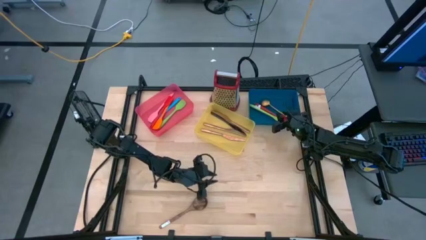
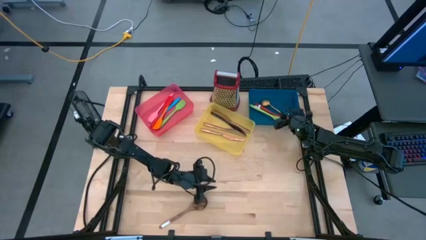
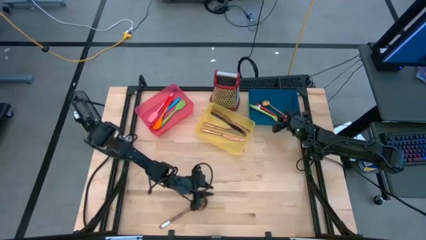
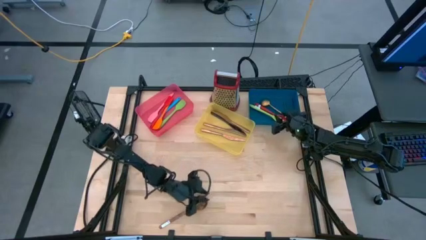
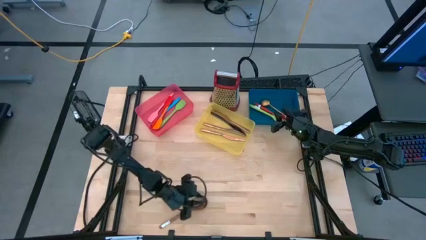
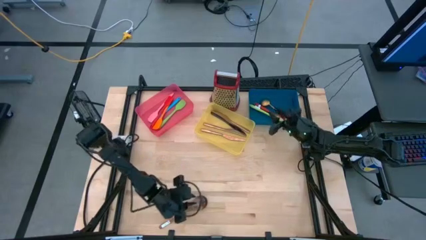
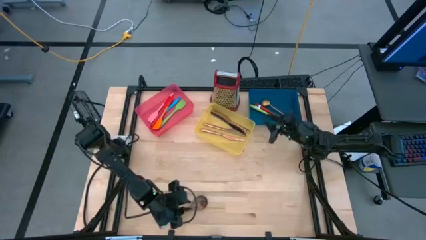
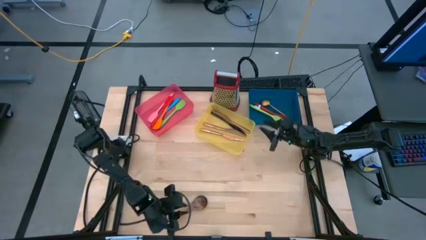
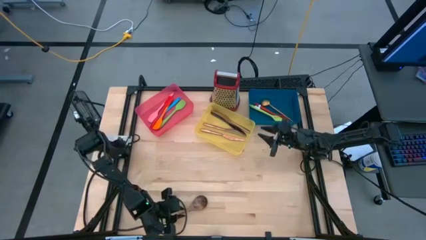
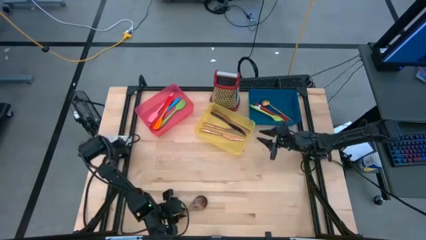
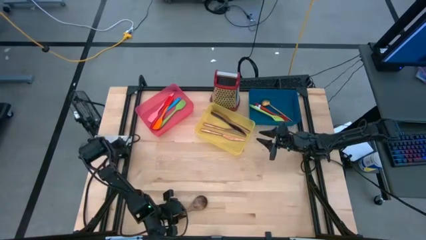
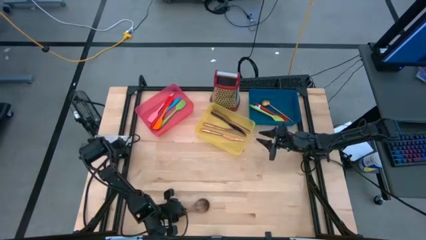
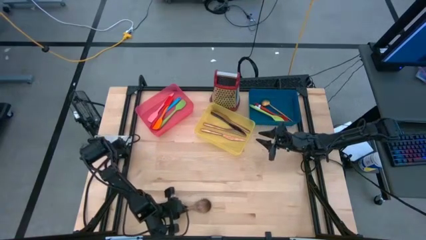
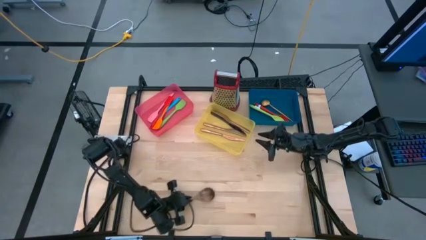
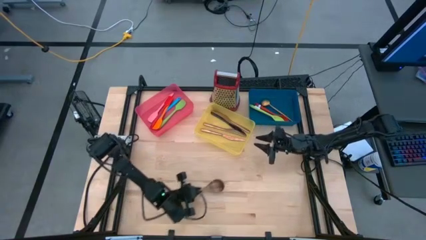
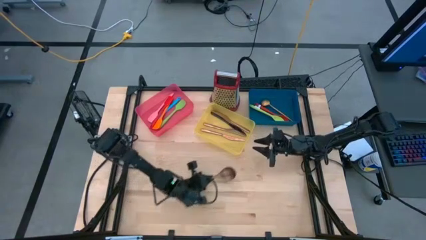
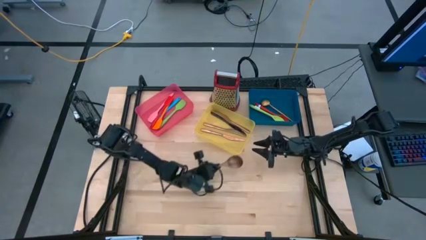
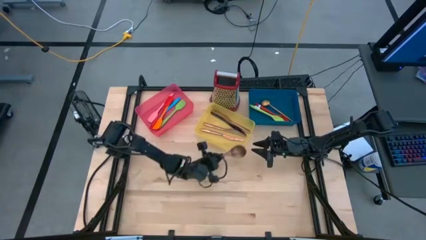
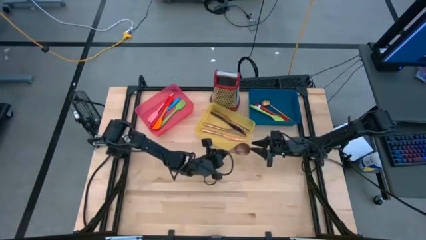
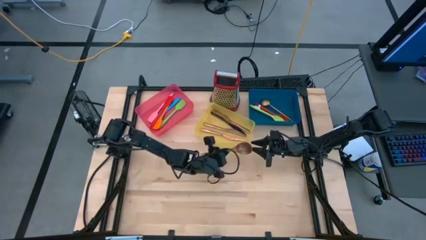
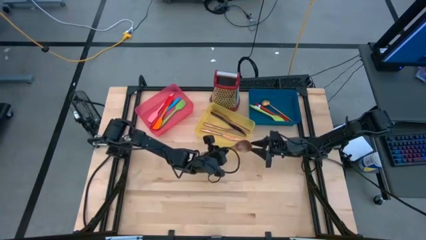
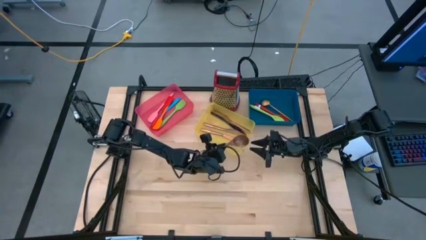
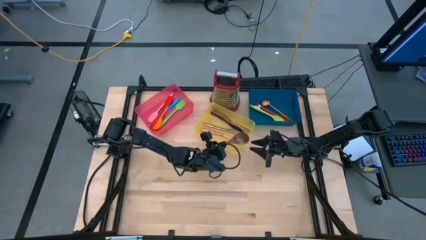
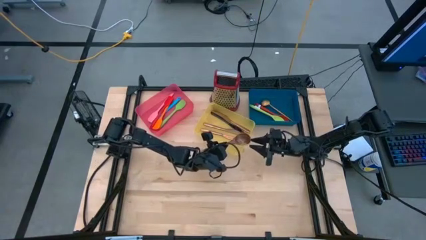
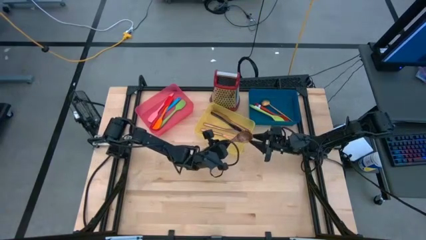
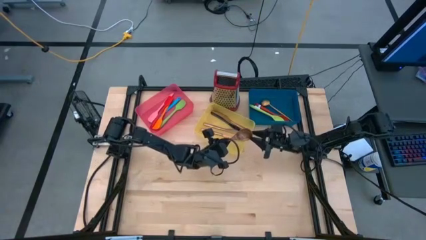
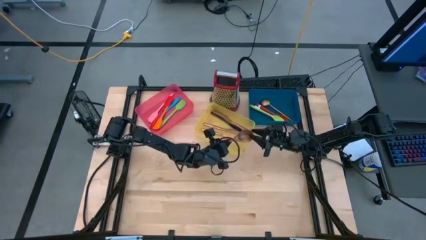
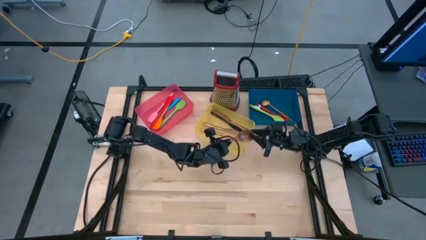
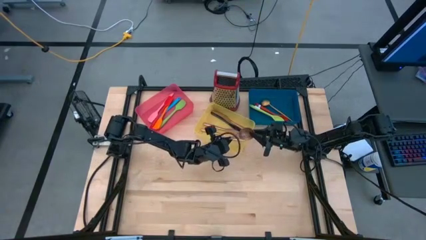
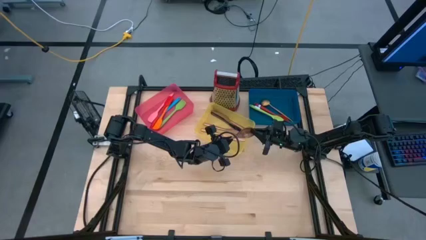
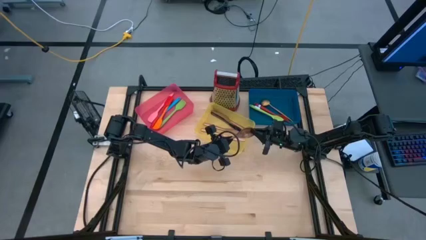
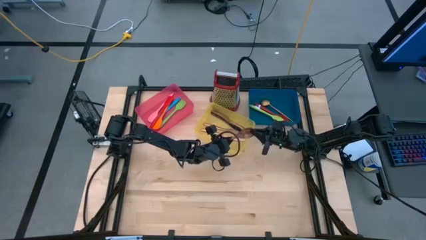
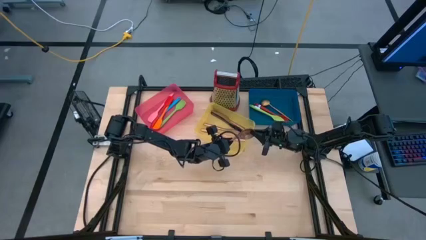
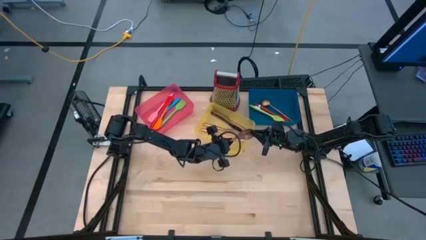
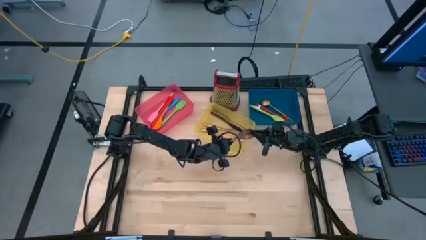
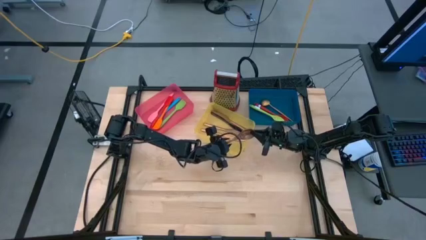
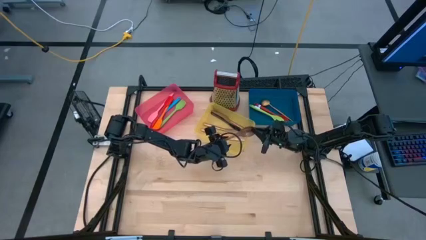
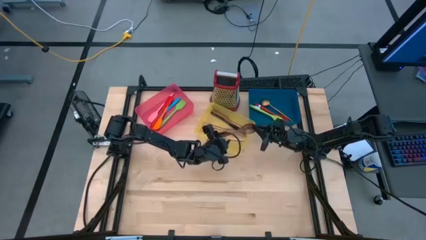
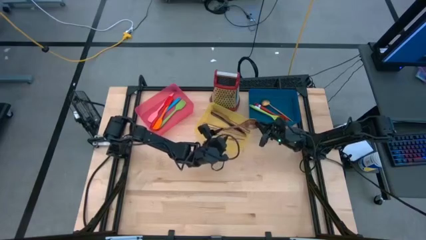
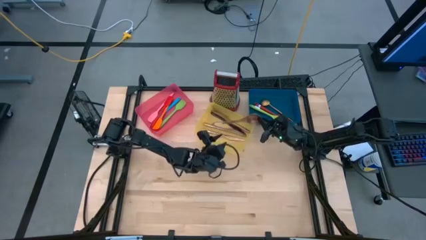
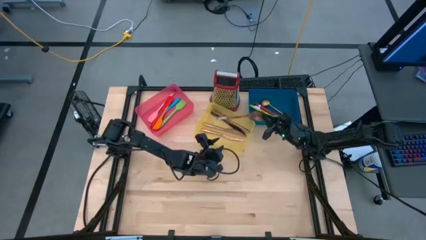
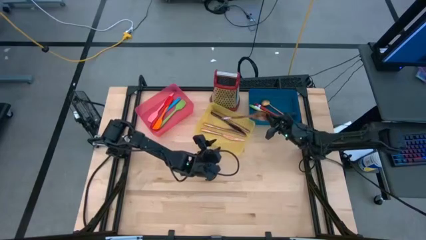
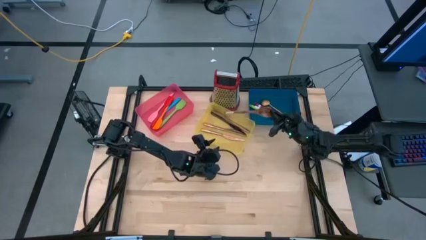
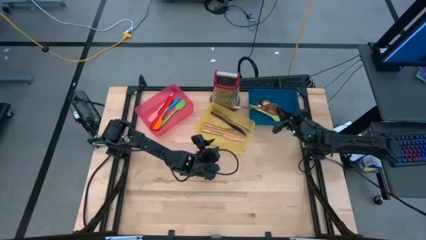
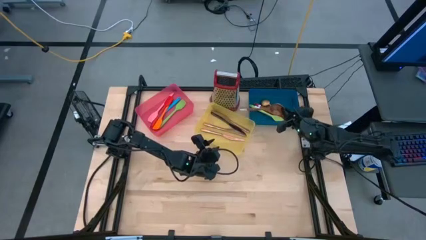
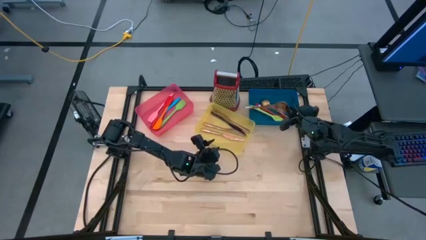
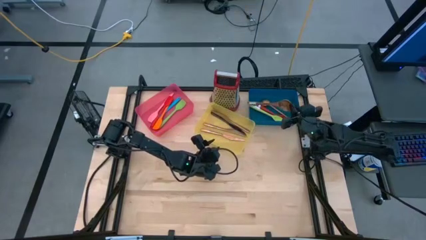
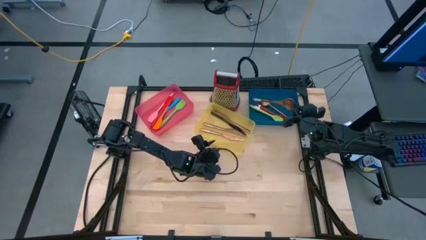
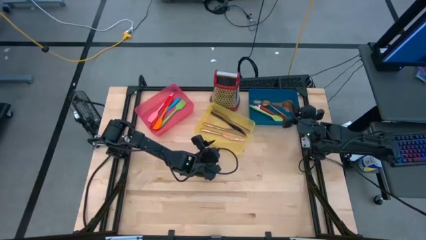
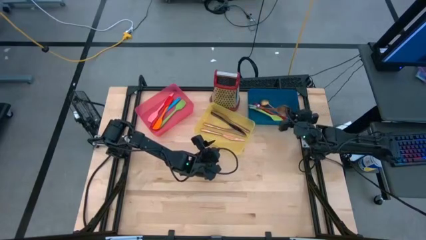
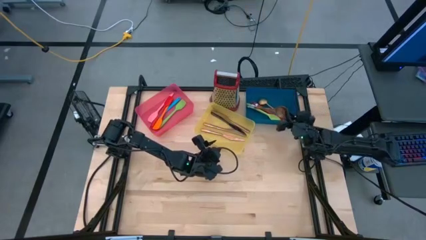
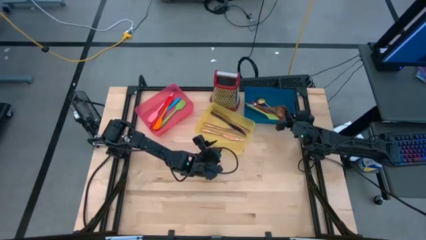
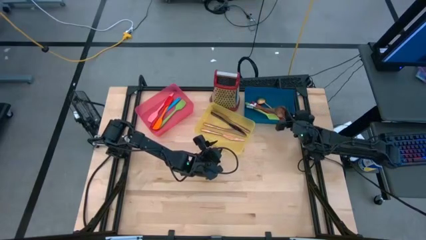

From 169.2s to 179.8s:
Task: Pick & Place Kitchen Items
Put the brown serving spoon into the blue bin

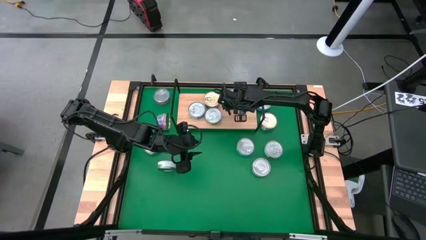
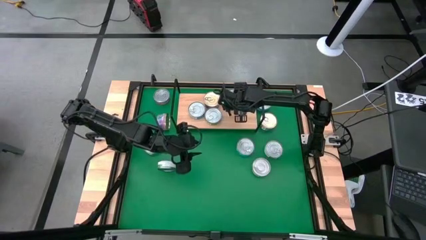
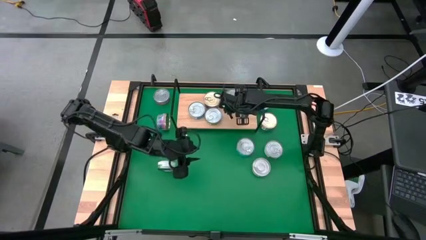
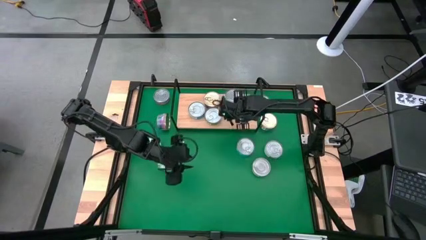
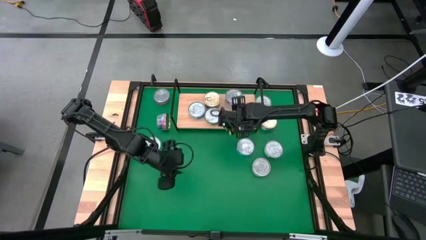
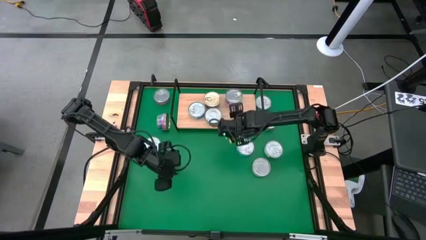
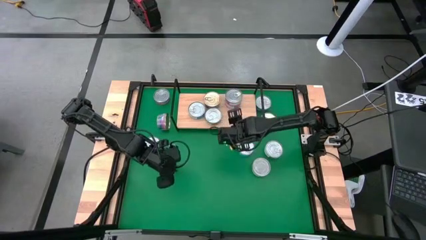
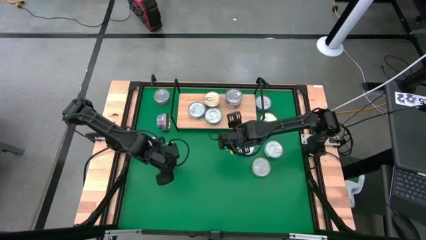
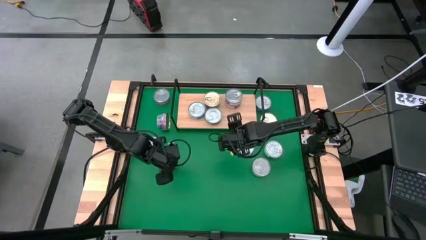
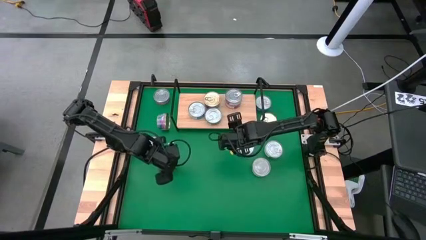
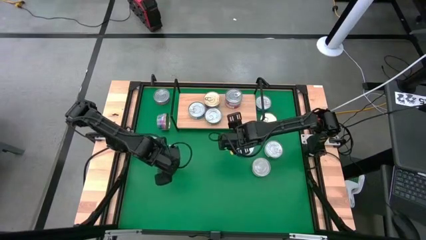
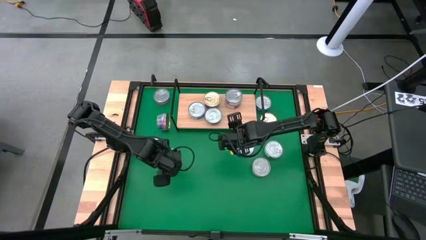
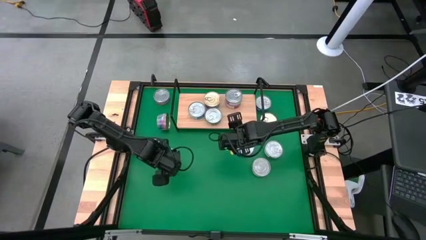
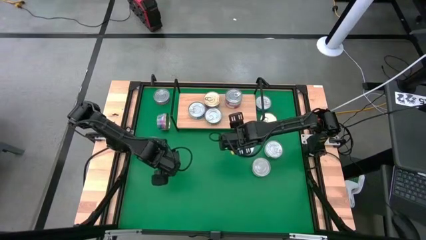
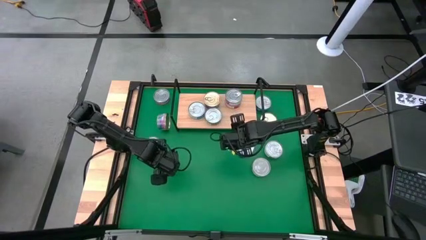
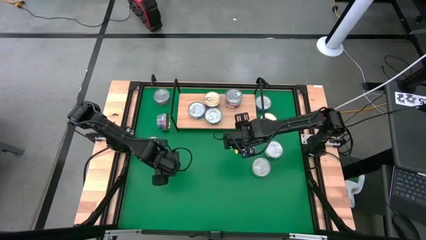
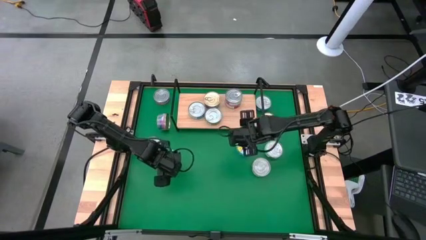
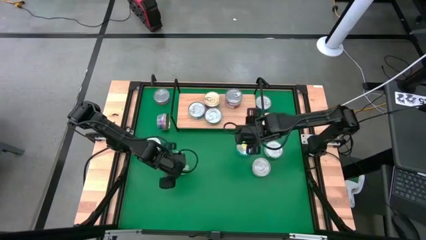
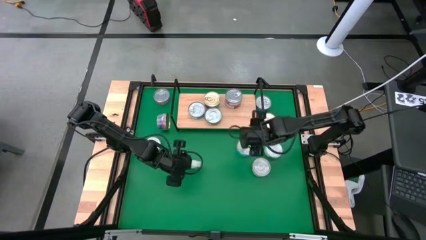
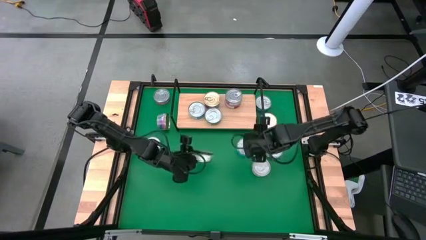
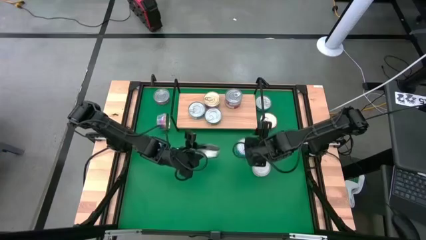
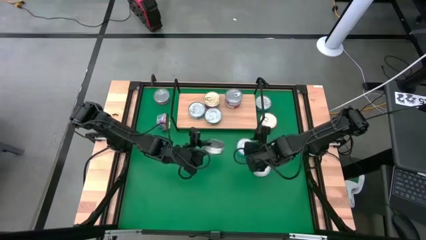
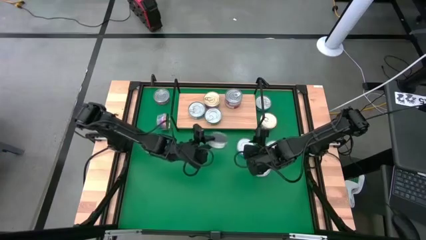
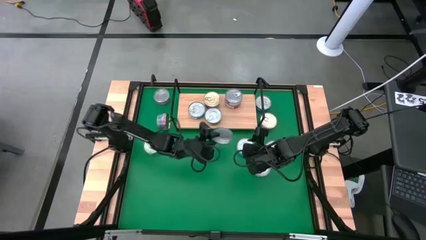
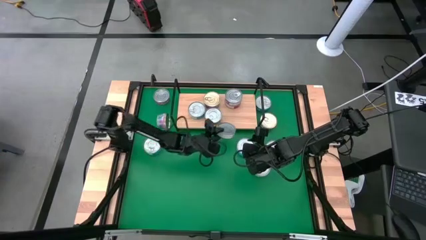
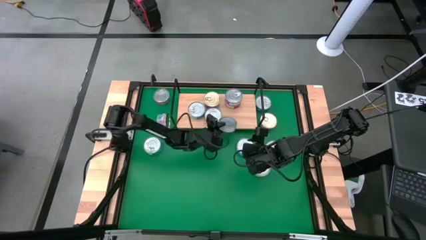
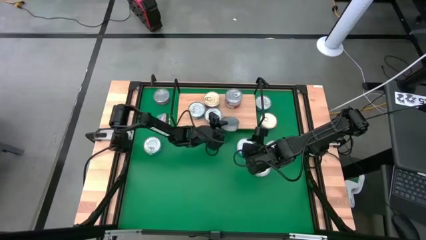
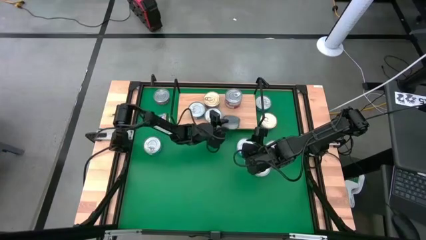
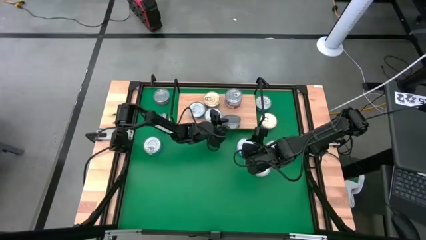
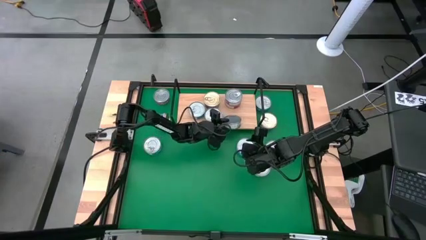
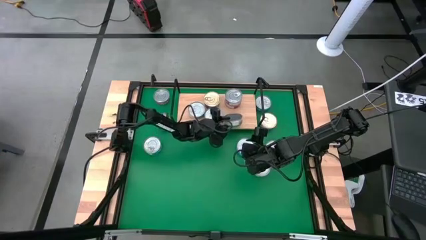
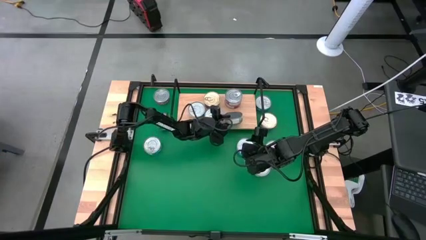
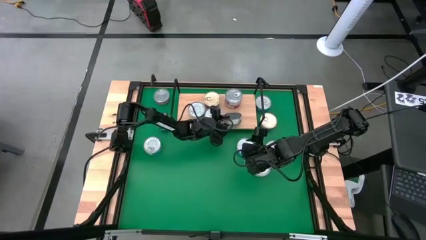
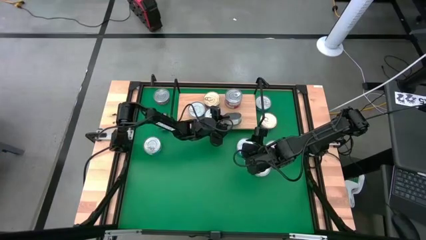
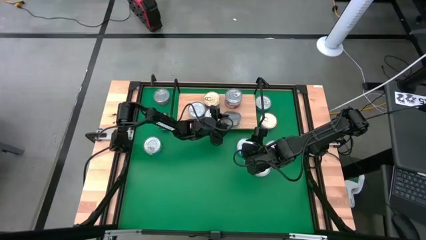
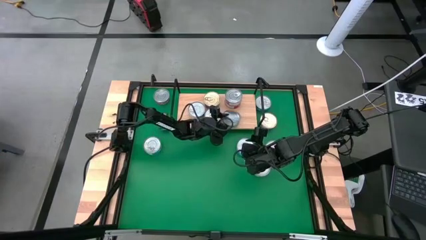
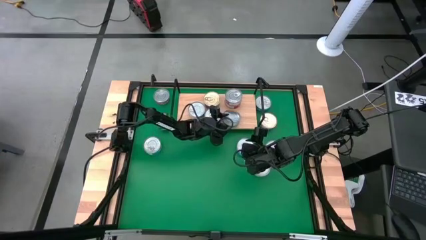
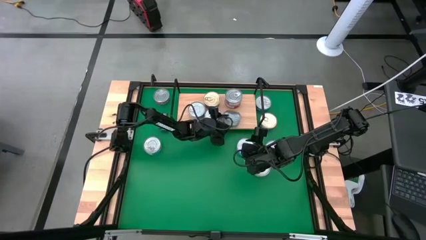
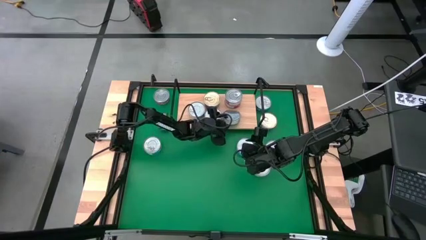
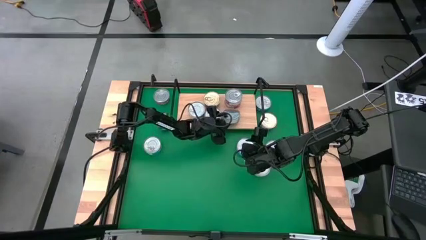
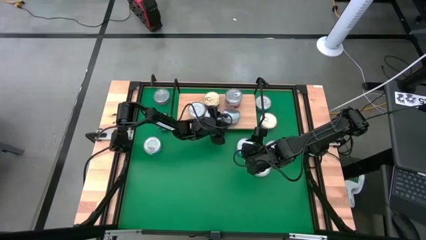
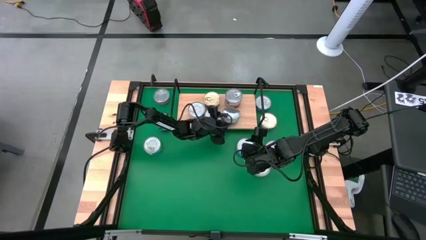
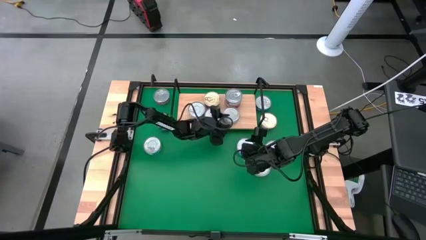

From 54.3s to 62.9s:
Task: Stack canned seafood by type on shelf
Put the green white tuna can on the shelf
